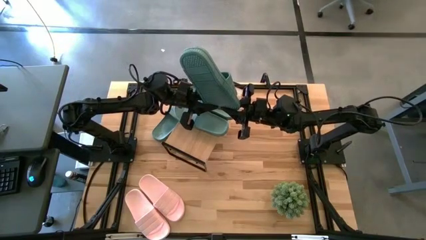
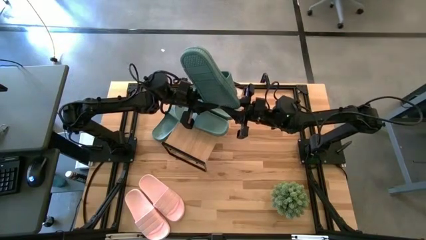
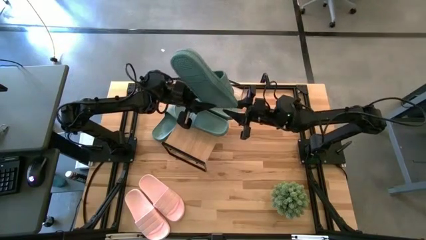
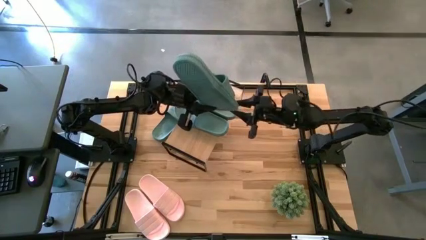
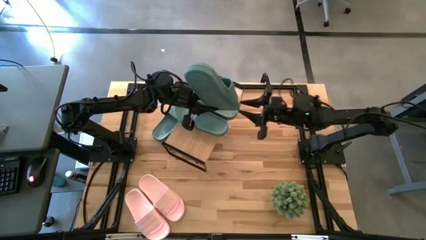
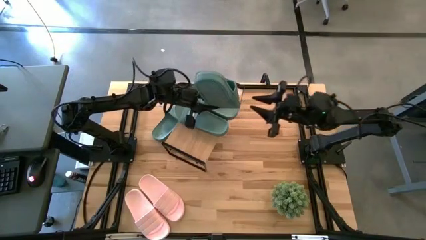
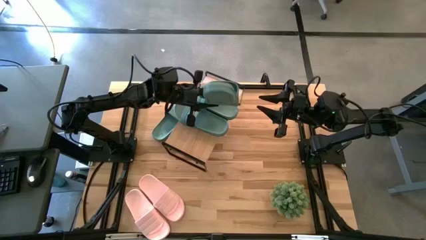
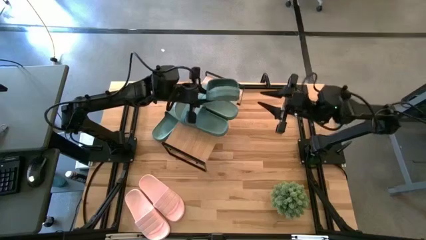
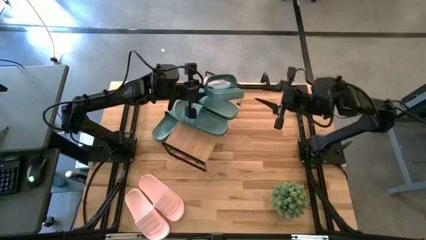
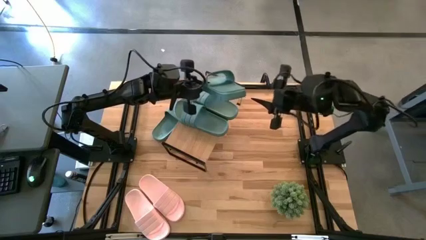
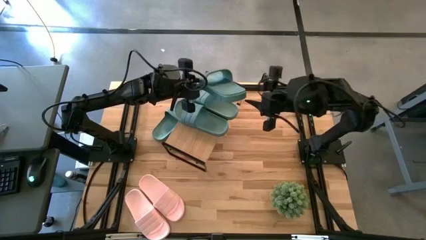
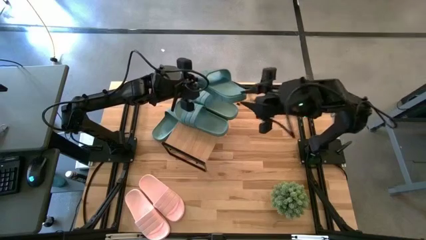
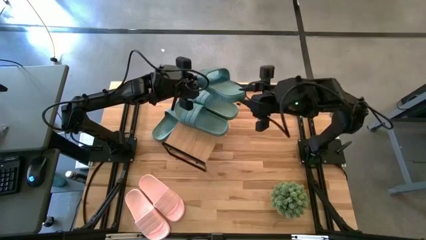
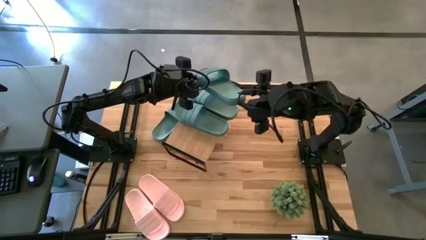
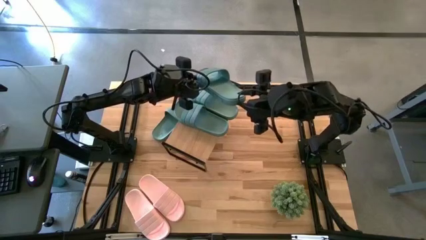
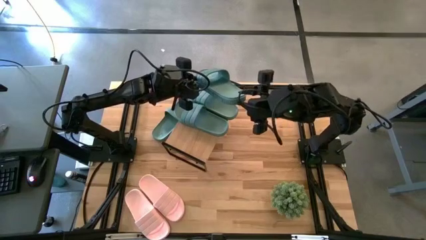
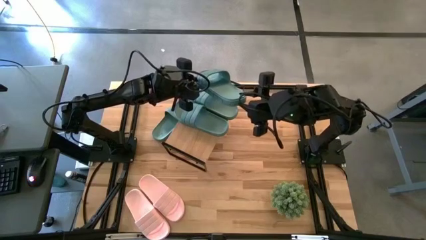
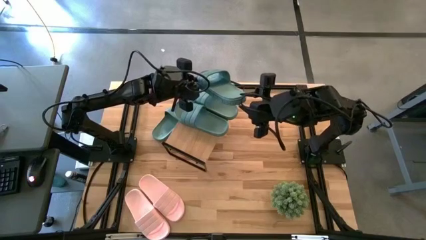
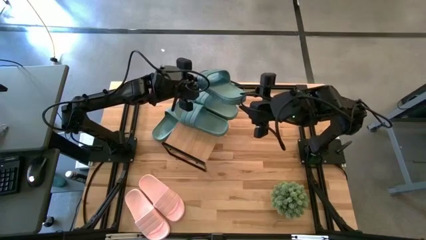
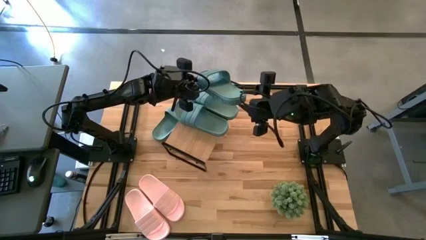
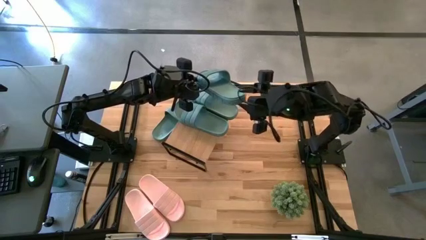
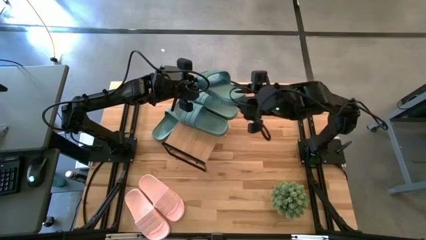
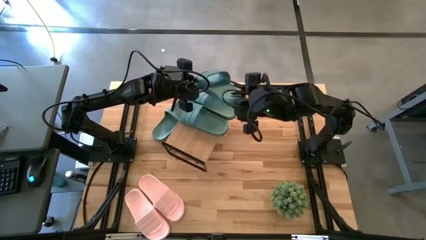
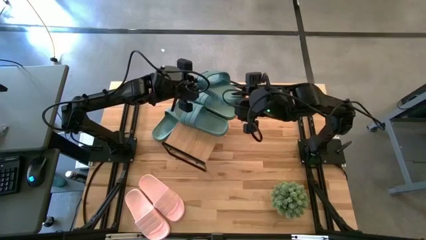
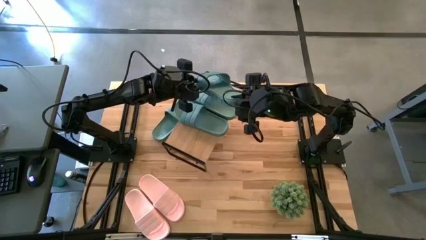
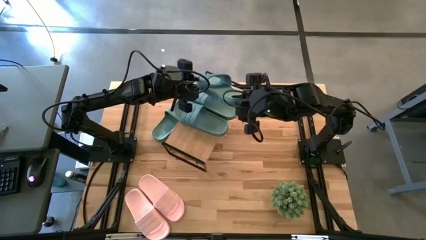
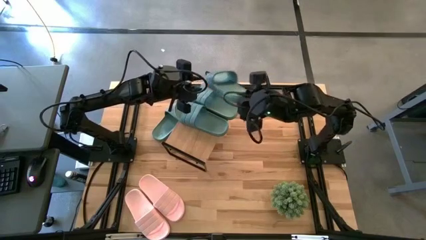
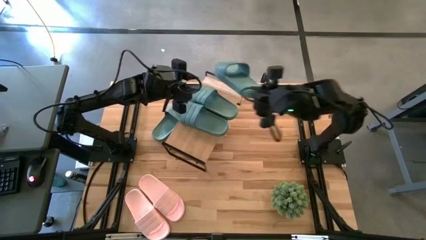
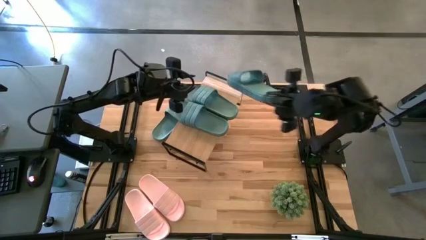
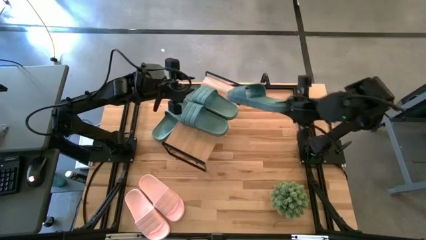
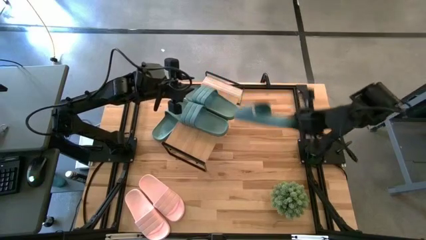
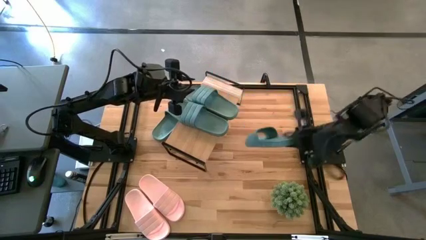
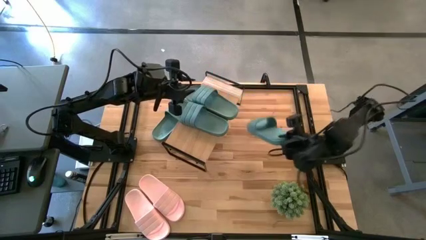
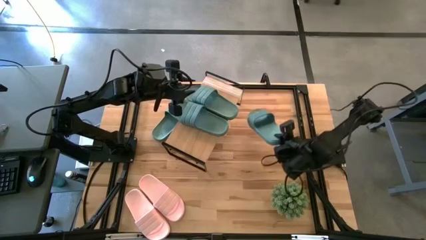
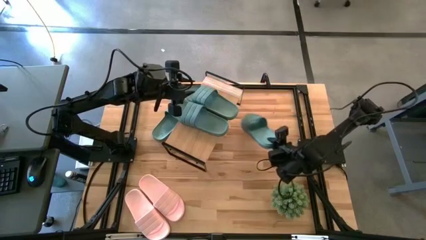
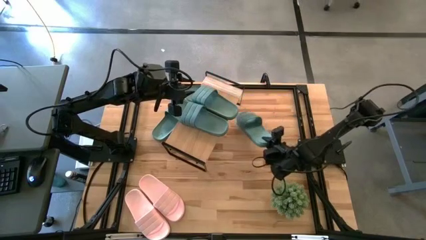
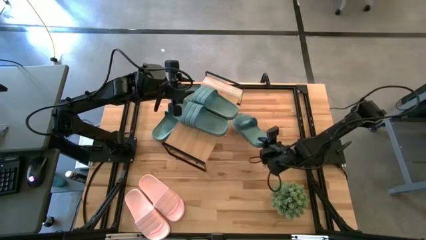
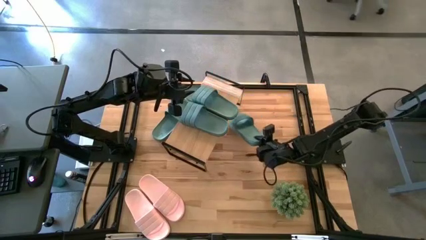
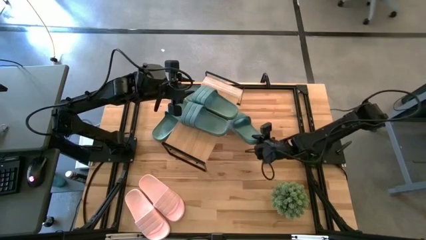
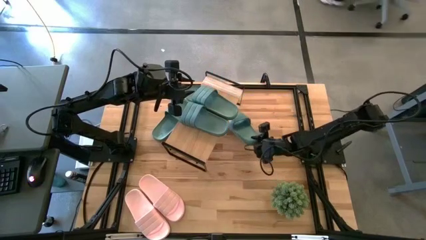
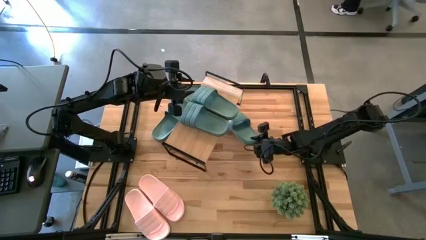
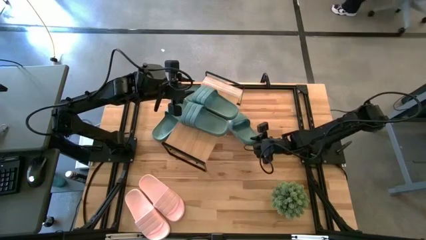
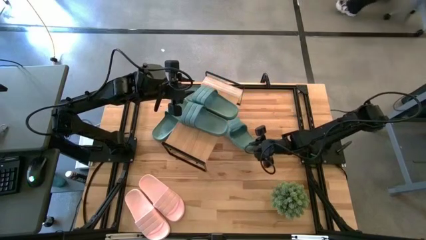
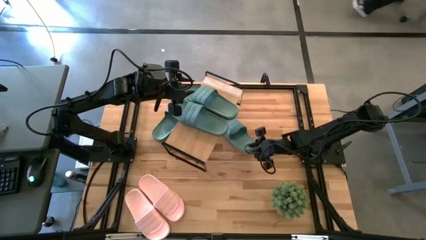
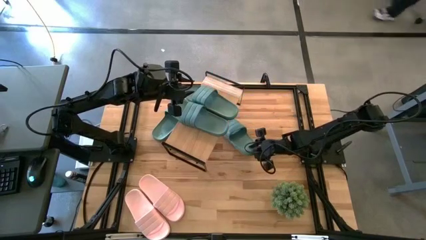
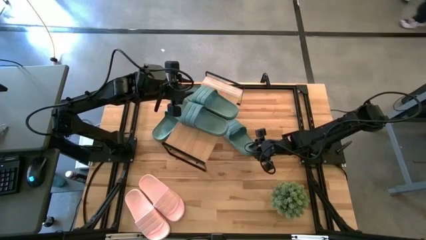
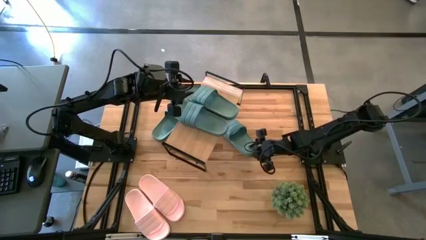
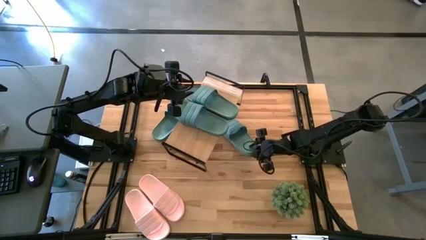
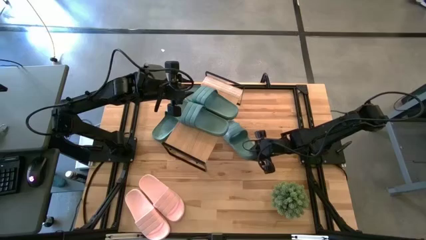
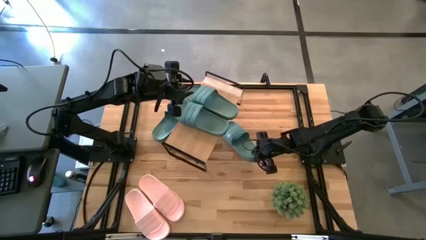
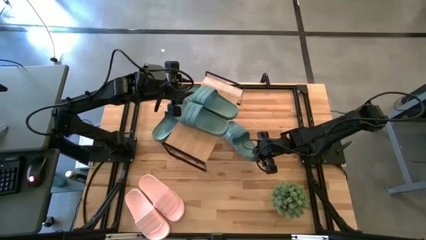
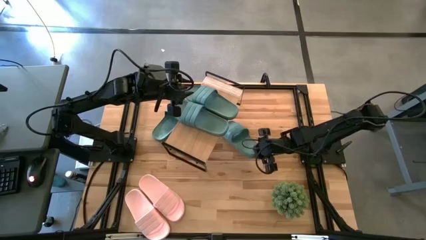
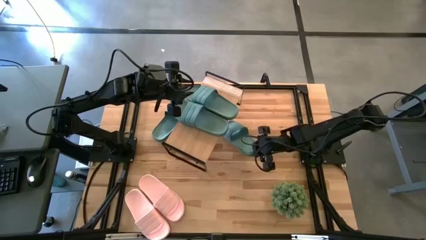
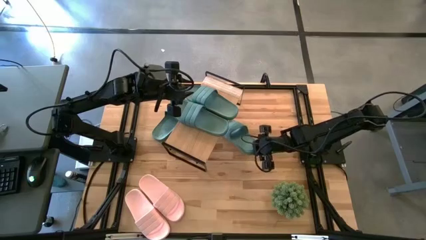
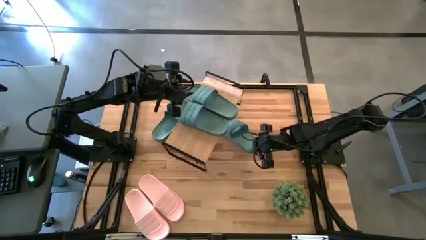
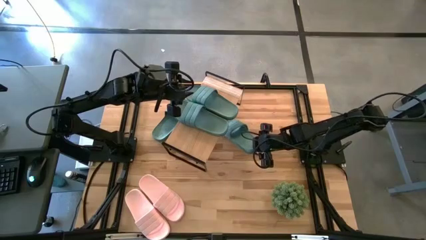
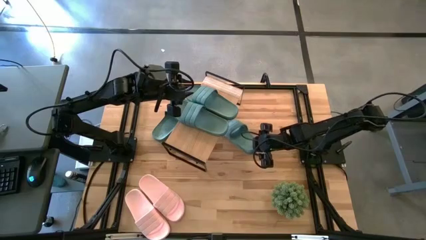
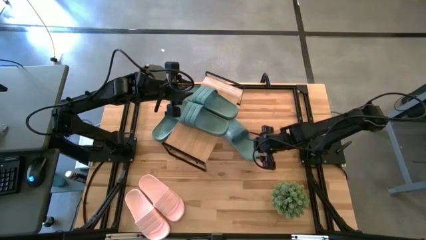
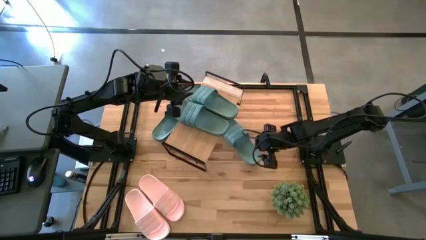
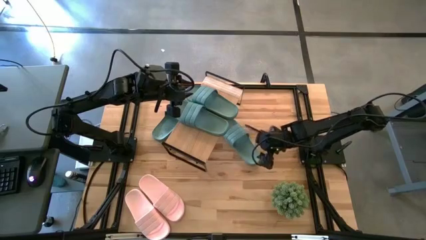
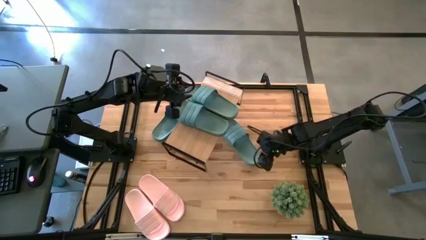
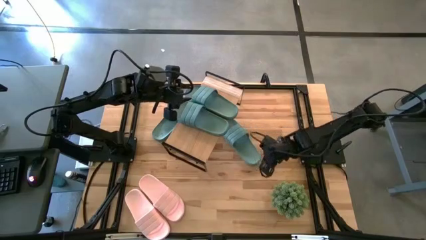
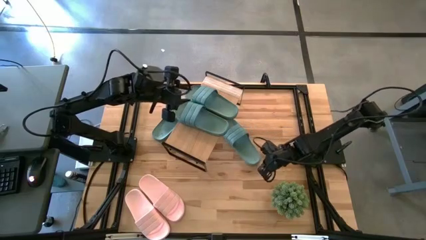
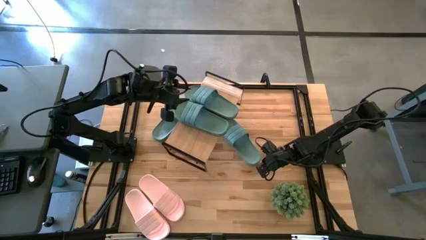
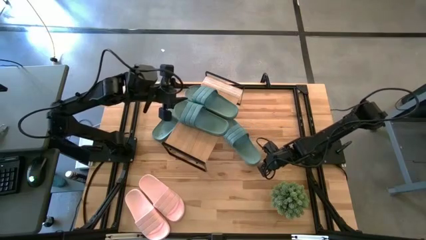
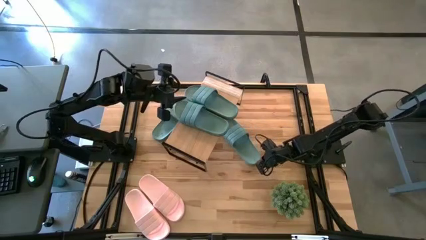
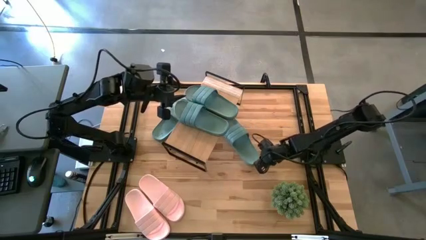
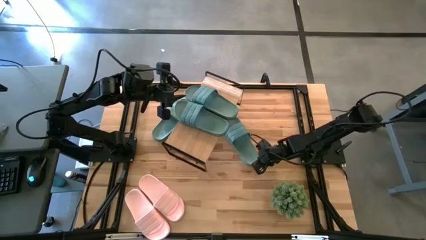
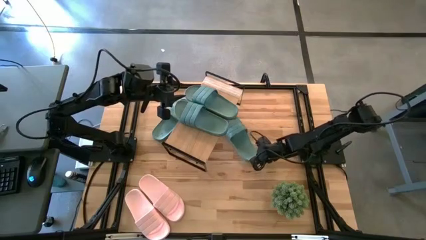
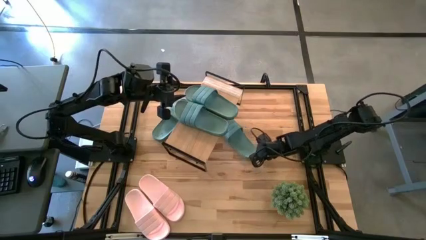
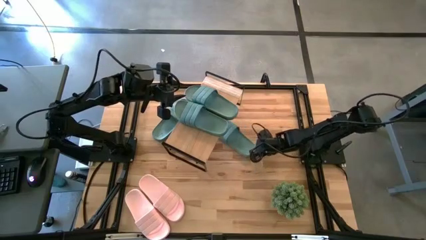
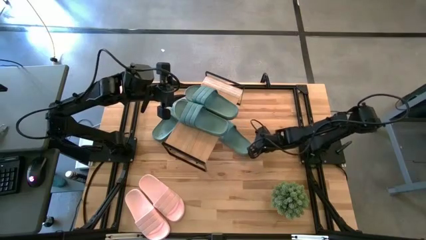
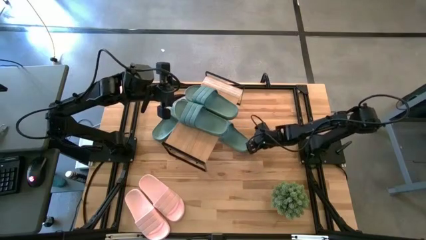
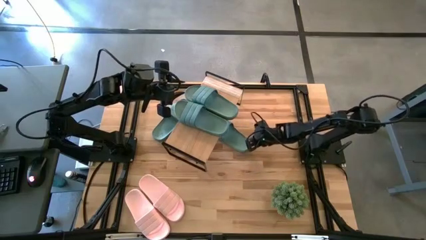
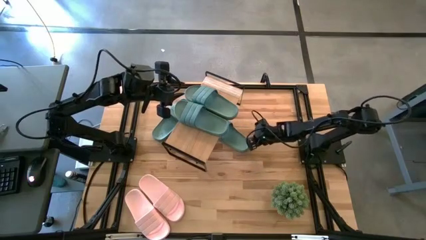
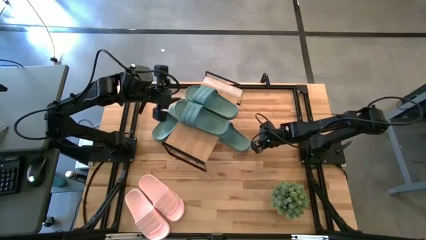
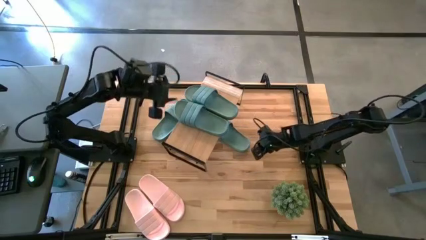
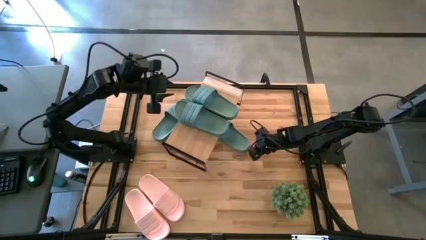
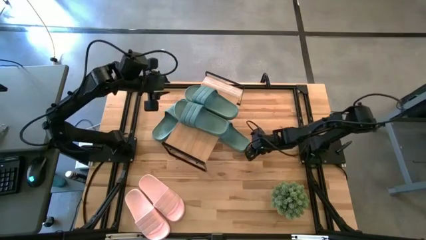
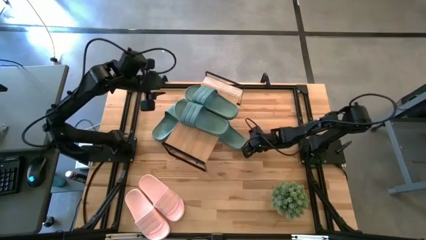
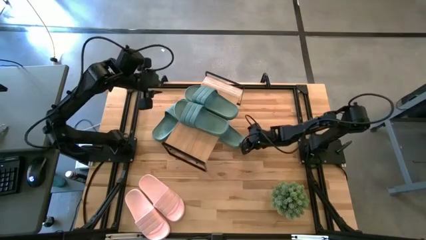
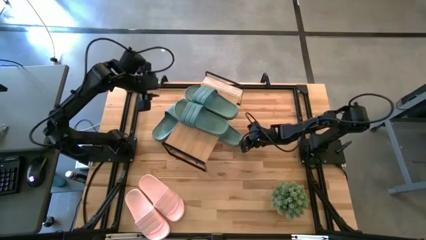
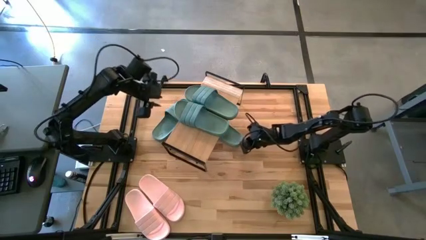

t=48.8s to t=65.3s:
Task: Pick and place slides into the shelf
Put the green slide under the shelf
